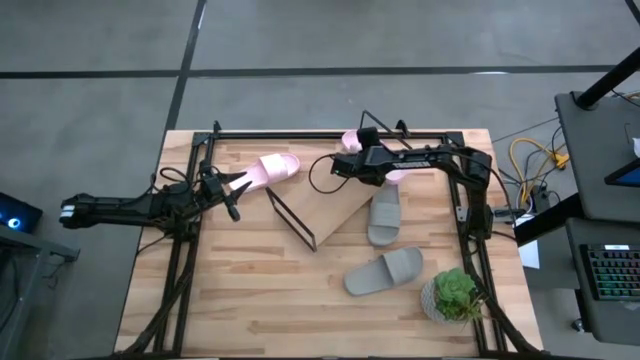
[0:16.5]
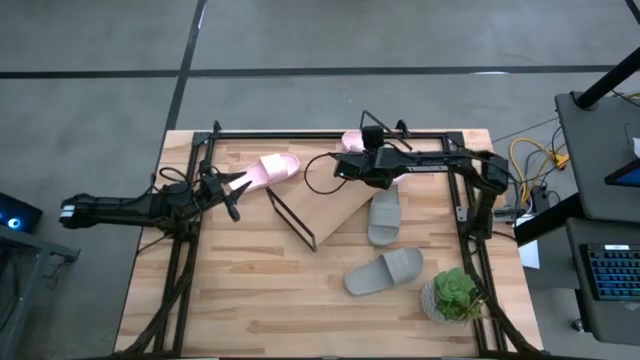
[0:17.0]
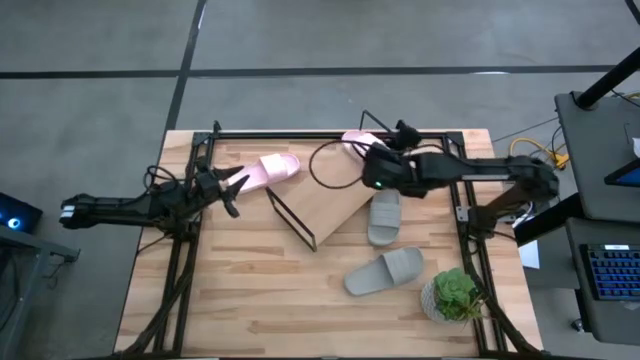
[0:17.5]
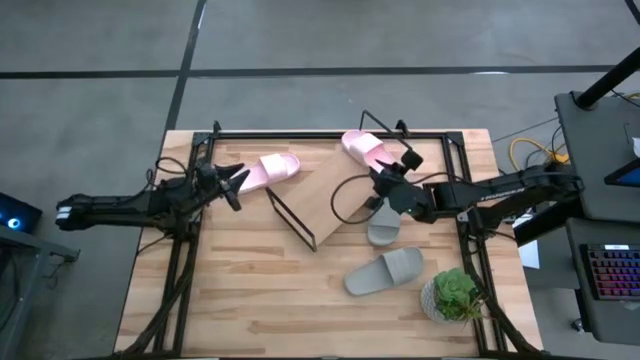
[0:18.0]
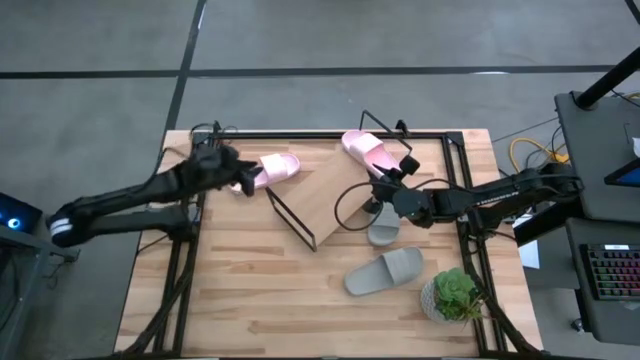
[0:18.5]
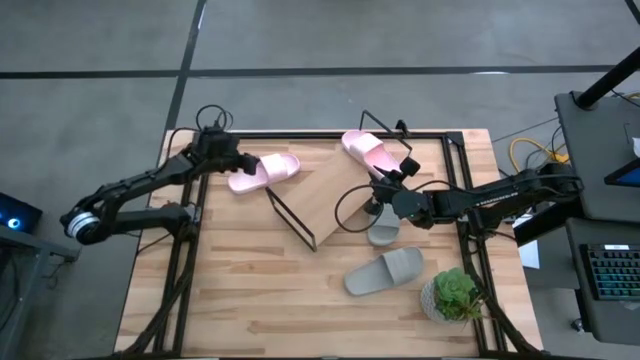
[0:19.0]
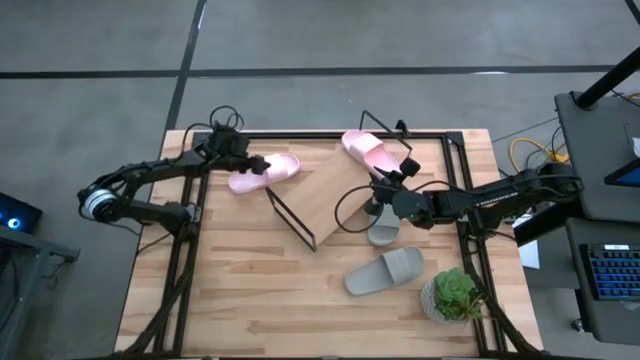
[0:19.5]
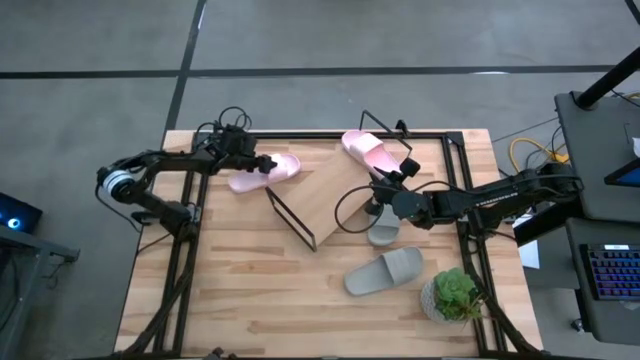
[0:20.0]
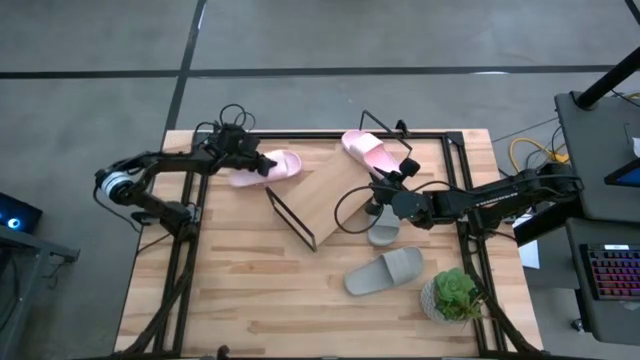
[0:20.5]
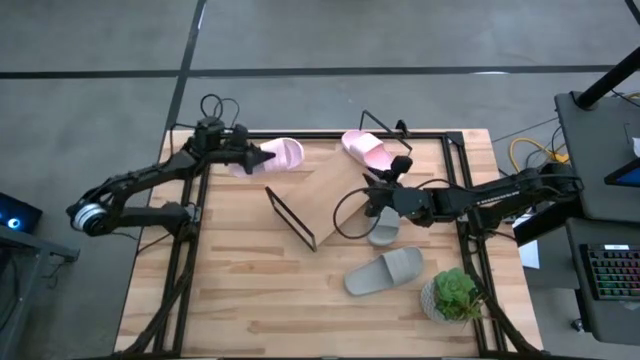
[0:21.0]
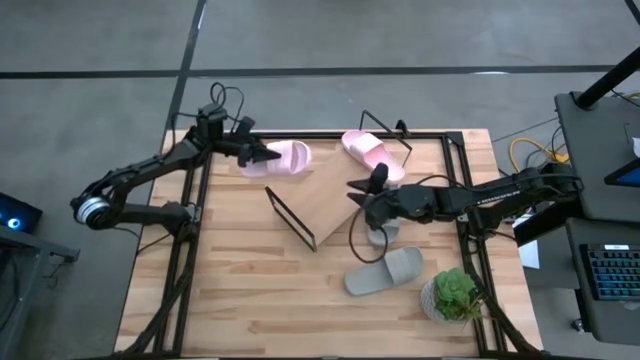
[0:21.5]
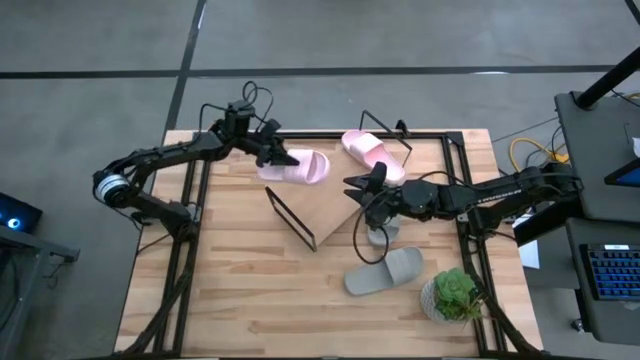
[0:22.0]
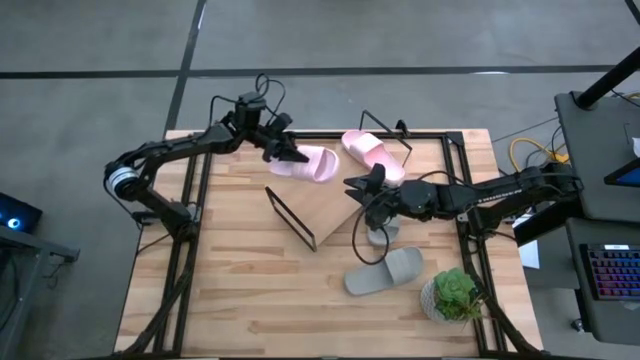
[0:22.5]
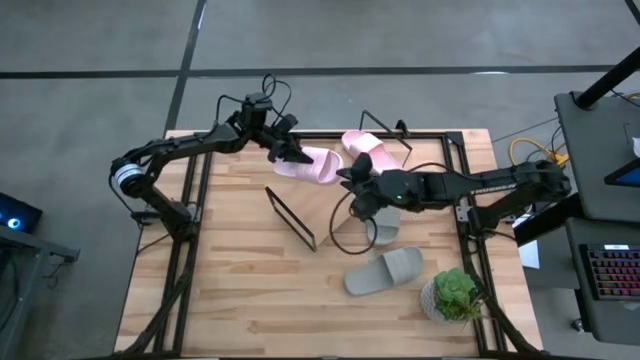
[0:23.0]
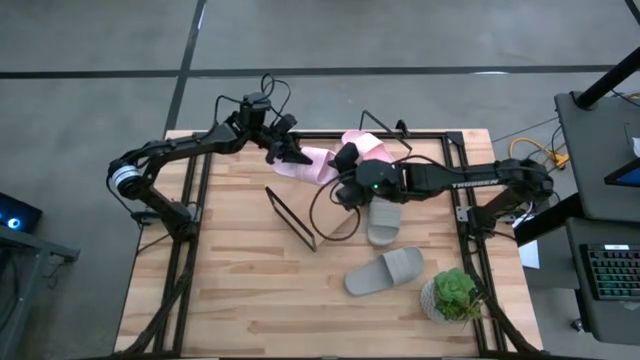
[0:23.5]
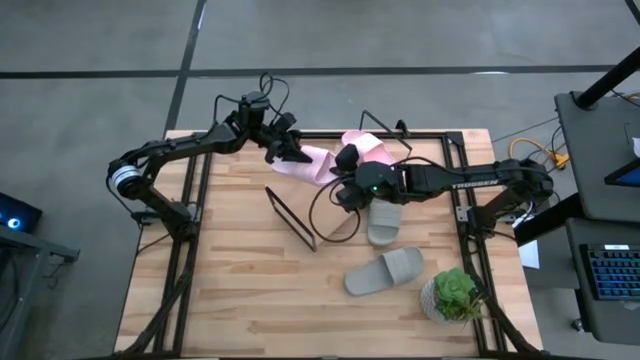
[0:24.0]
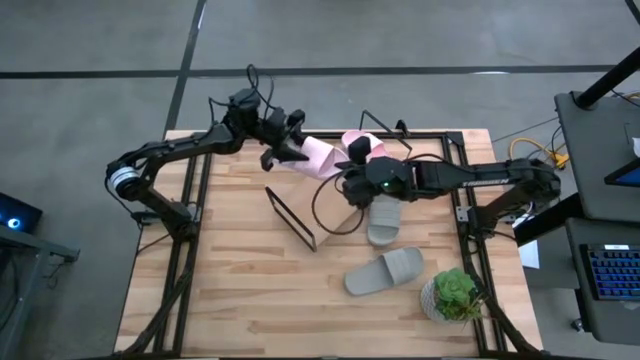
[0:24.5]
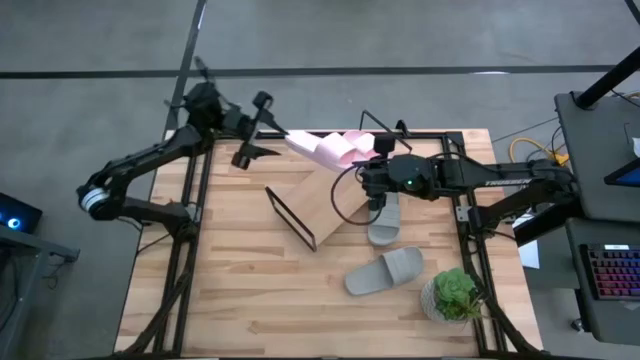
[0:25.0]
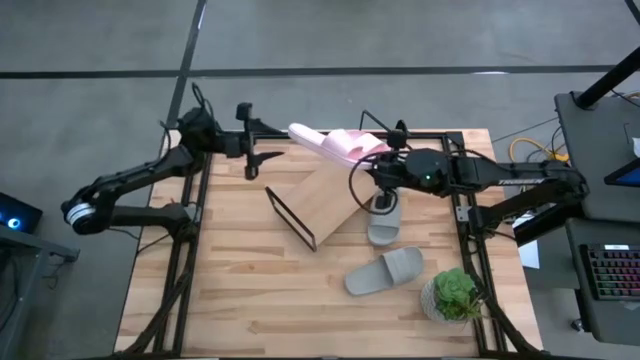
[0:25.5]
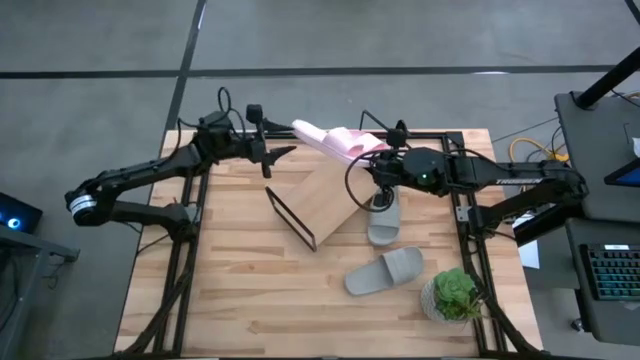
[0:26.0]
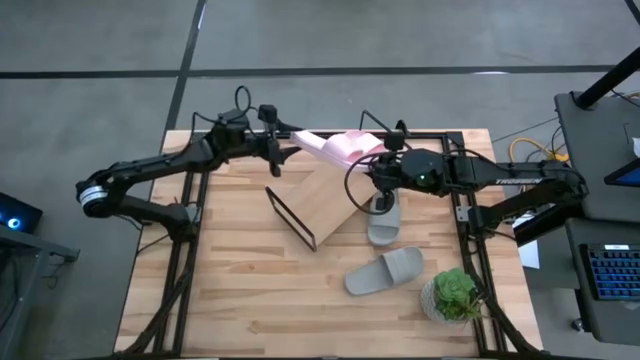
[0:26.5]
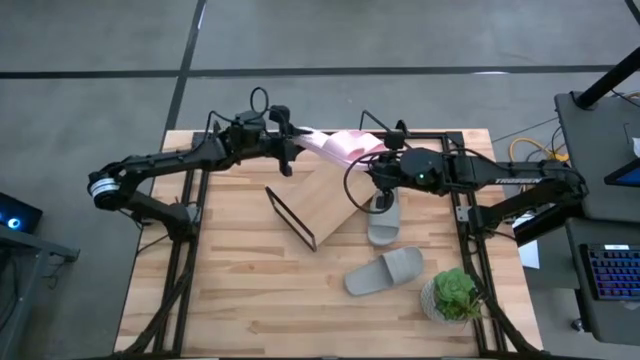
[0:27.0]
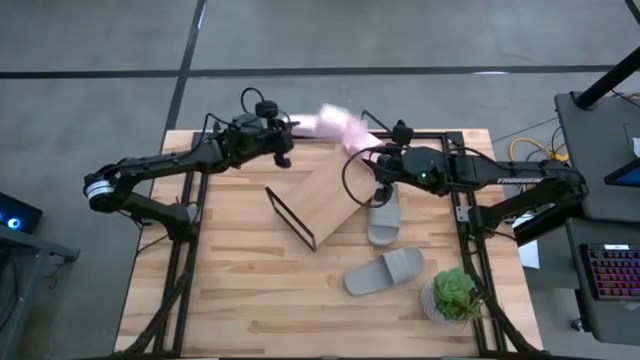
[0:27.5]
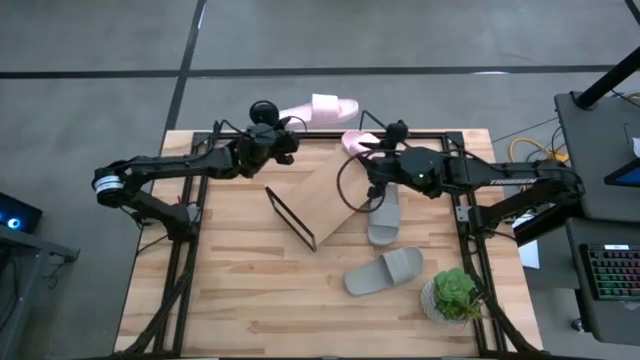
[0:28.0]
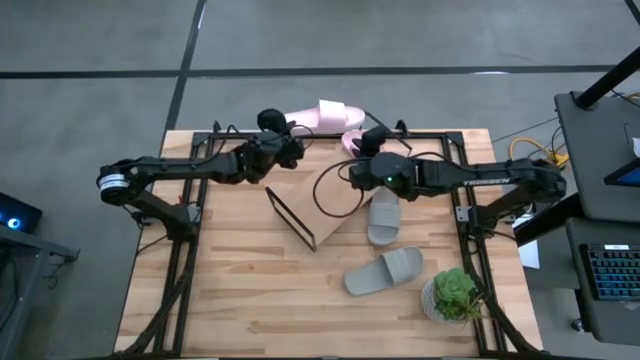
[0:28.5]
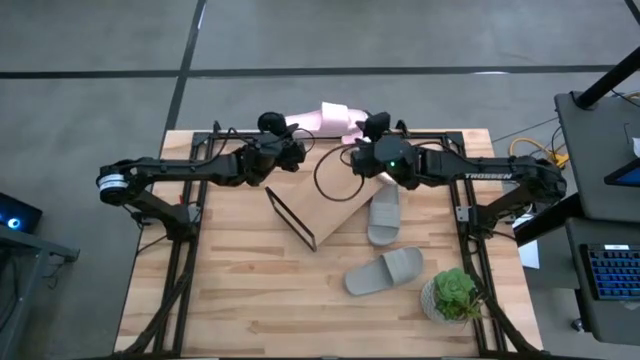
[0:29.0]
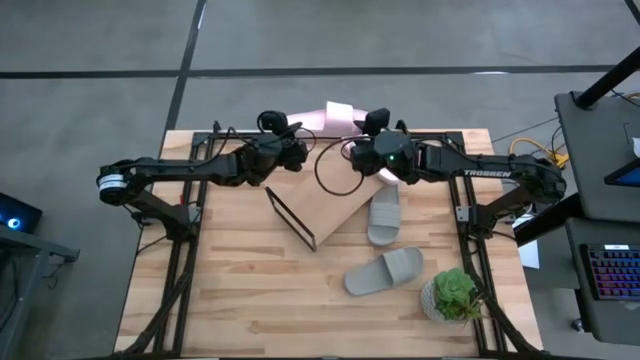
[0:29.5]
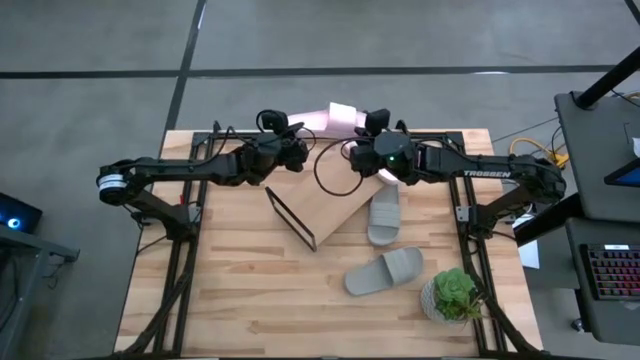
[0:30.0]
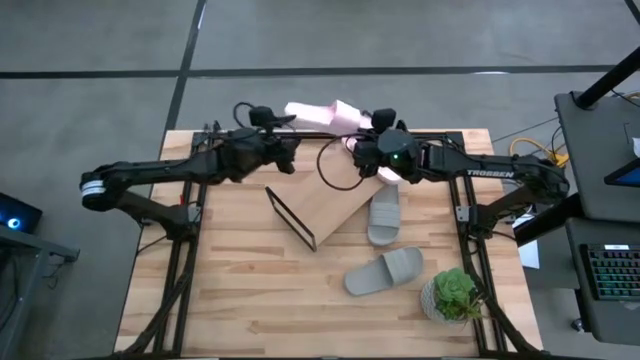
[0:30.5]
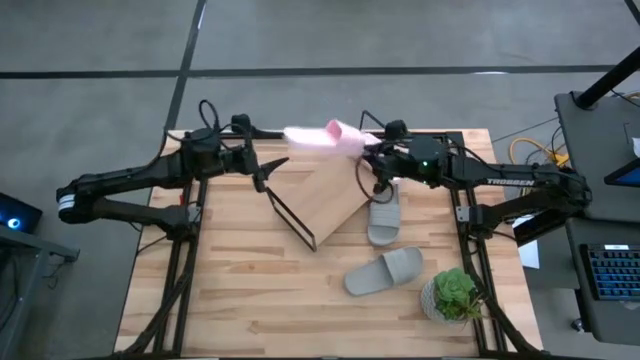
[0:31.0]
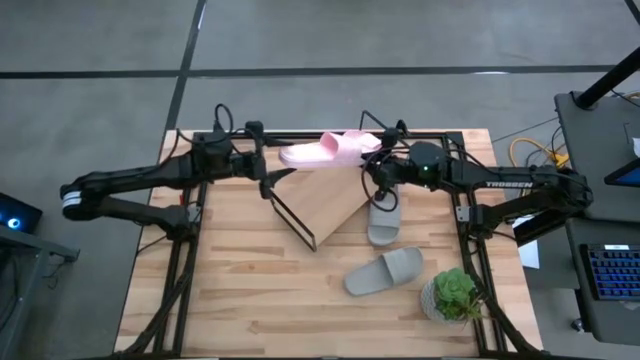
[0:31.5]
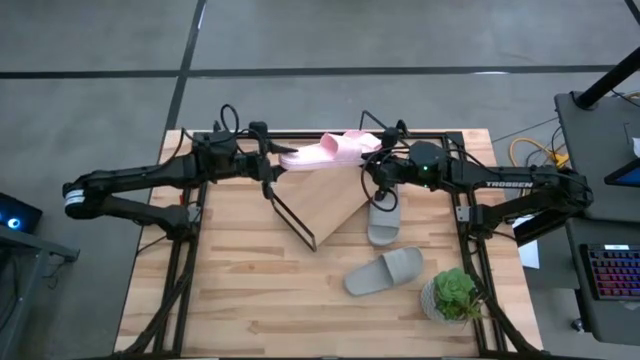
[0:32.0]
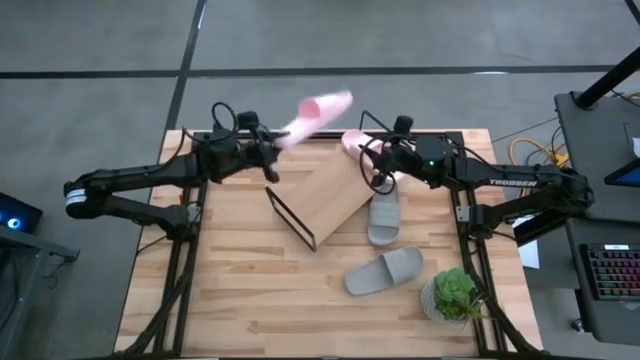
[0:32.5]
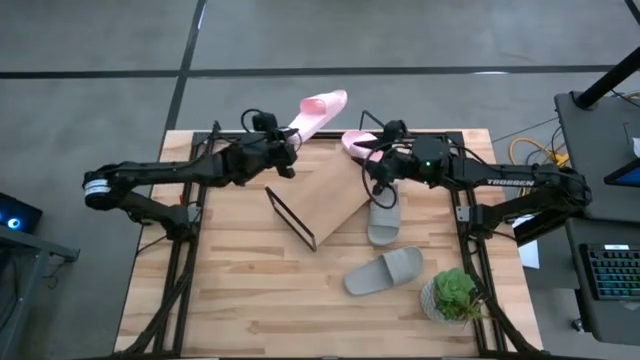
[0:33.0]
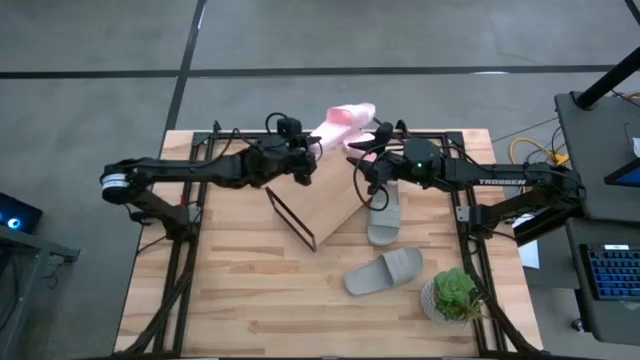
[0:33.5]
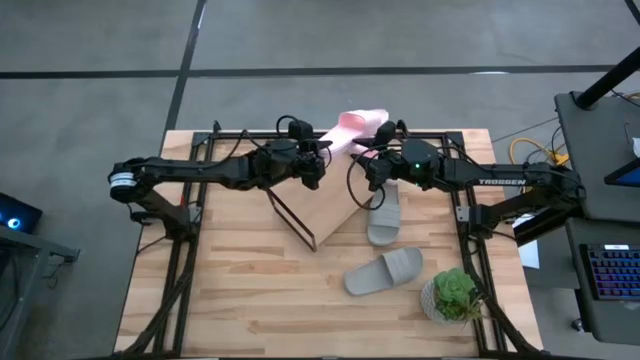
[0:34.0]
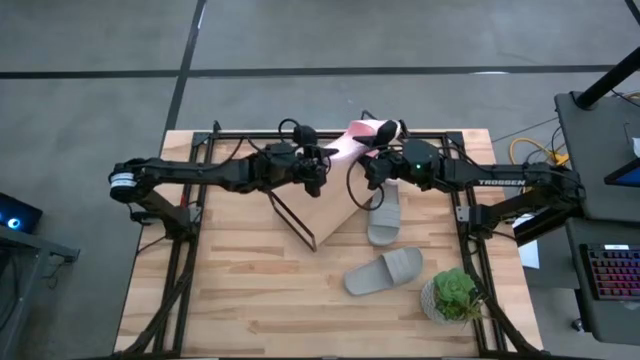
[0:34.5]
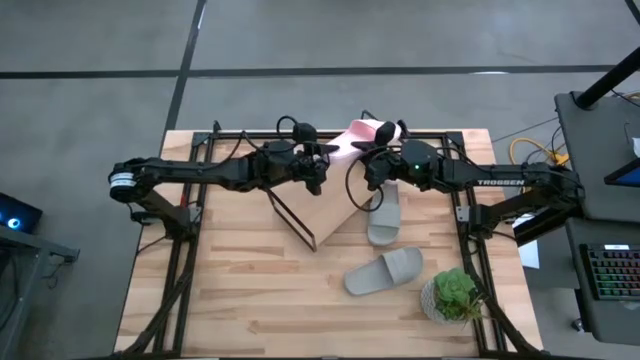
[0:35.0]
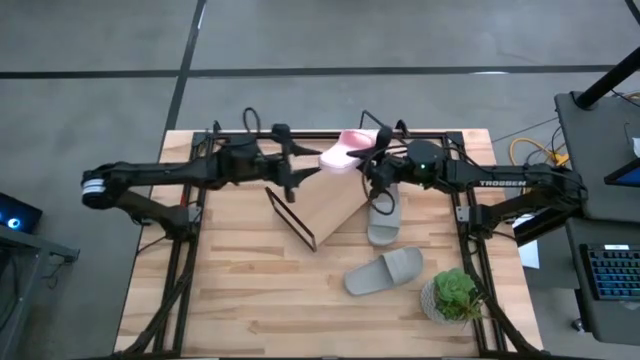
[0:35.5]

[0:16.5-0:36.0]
Task: Pick and place slides into the shelf
Put the pink slide on the shelf

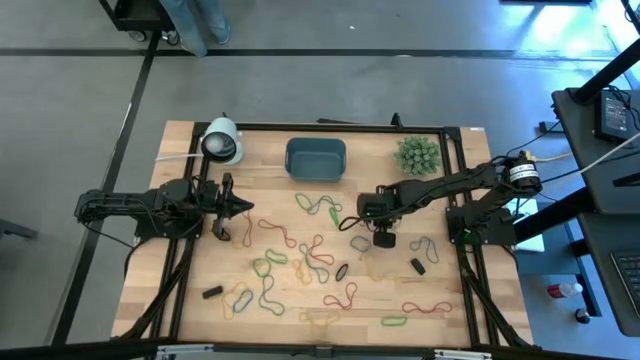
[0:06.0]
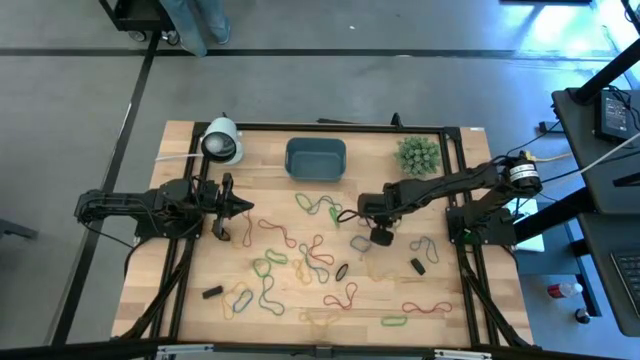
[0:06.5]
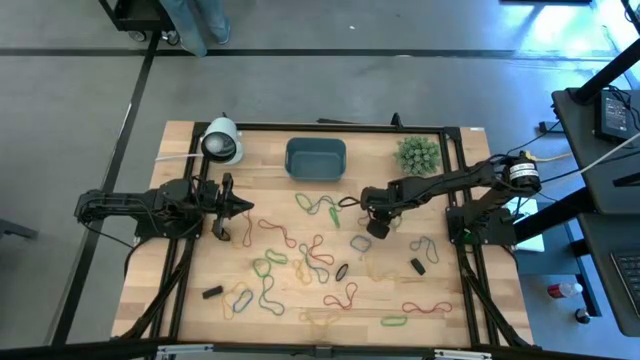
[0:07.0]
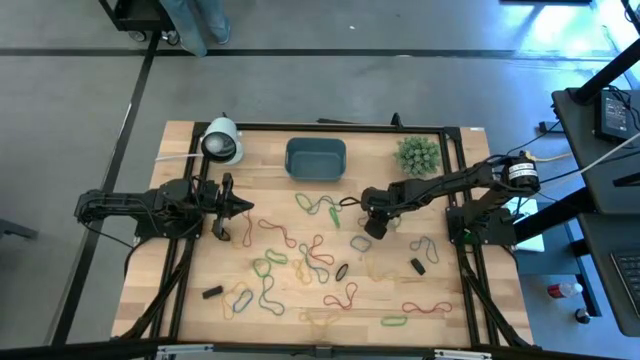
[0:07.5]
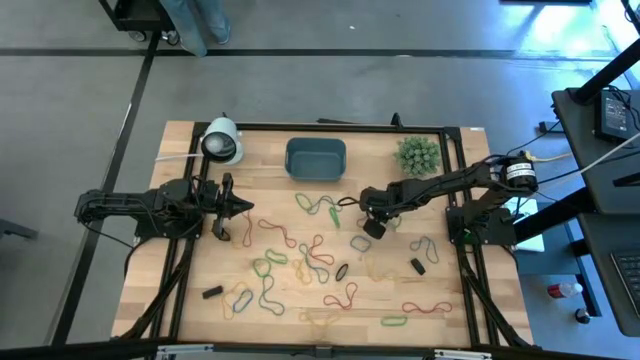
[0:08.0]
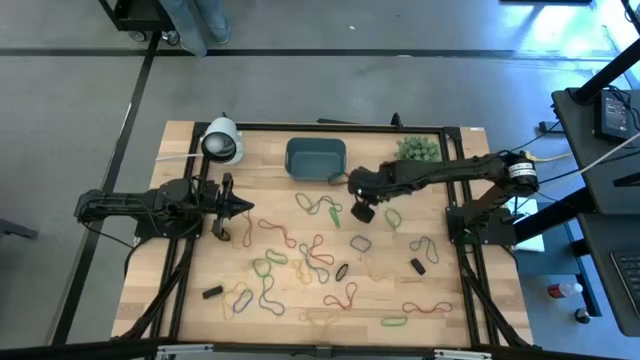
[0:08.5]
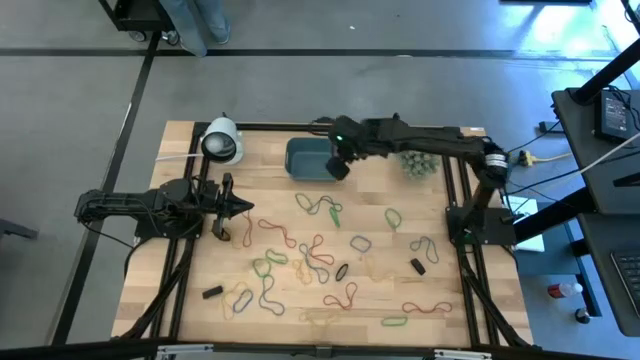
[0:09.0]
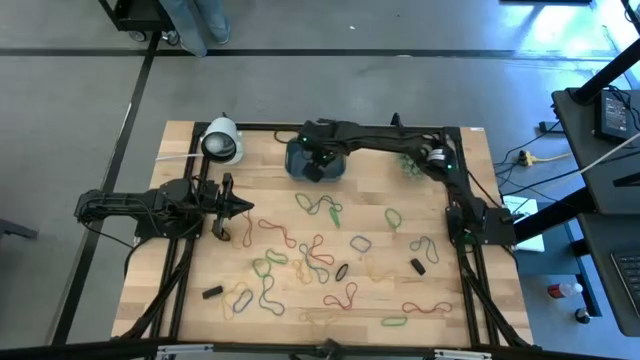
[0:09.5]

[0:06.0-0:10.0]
Task: Pick and place rubber bands into bin
Put the red rubber band into the blue bin
